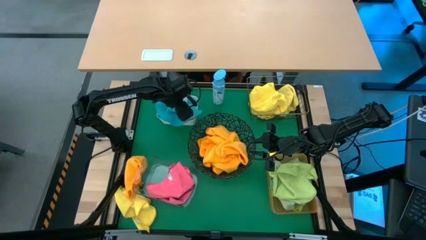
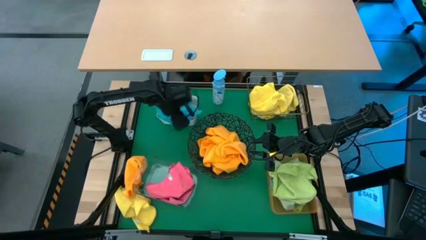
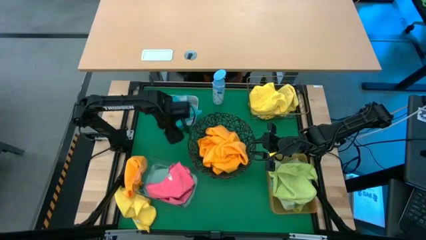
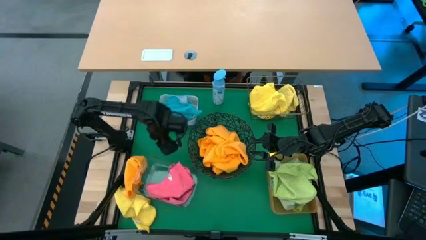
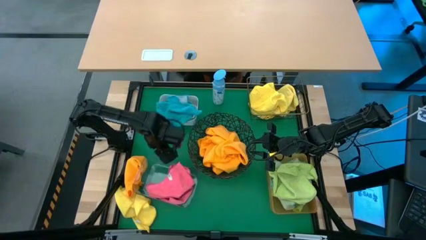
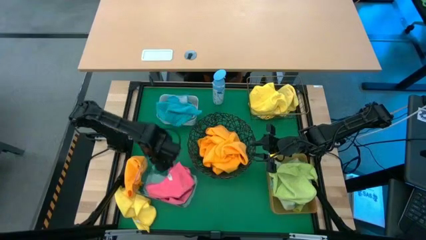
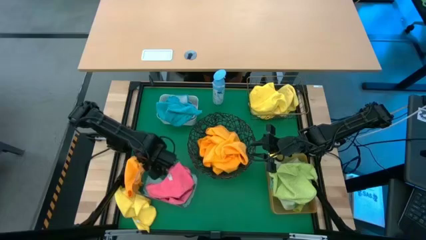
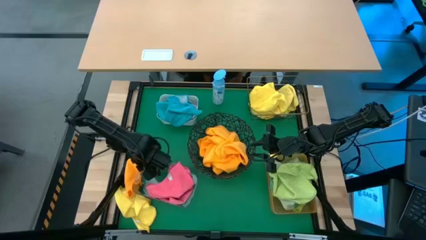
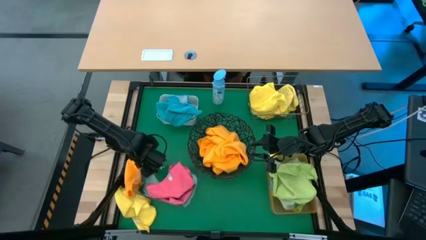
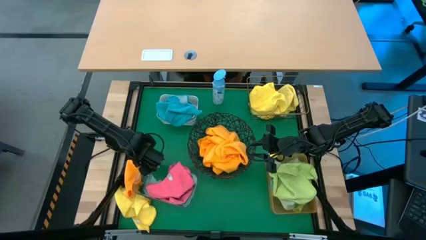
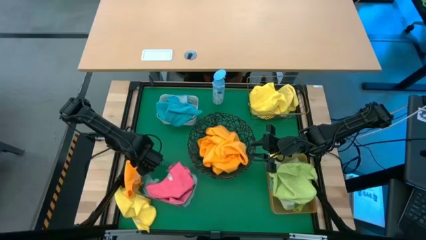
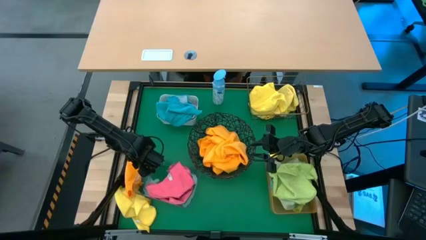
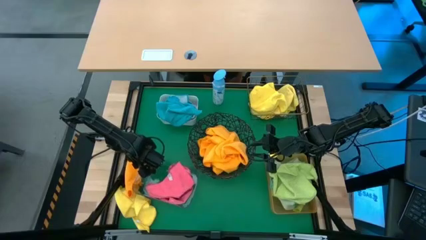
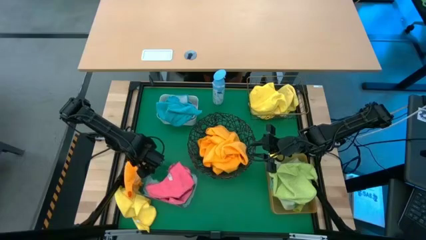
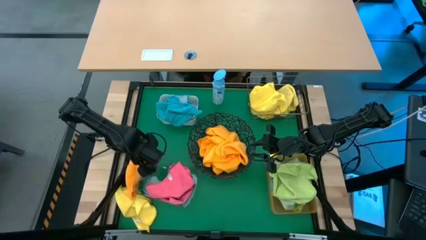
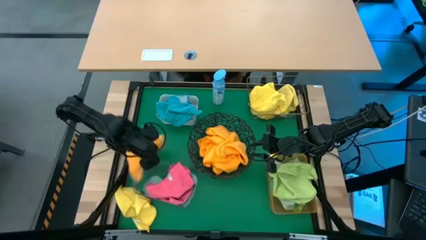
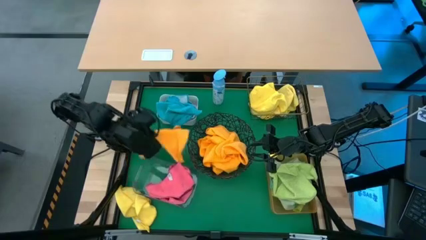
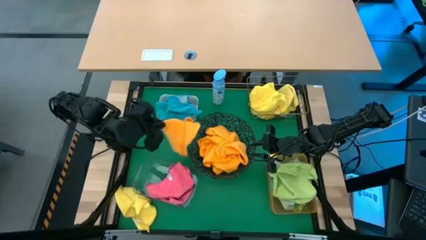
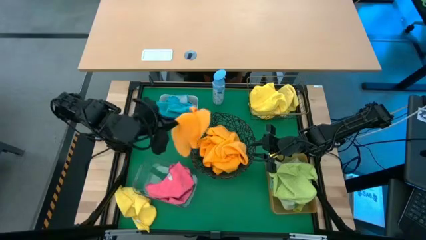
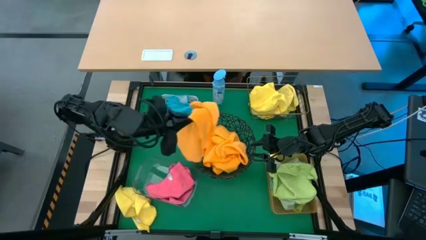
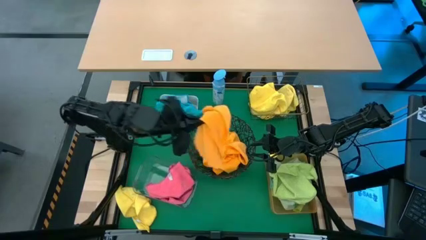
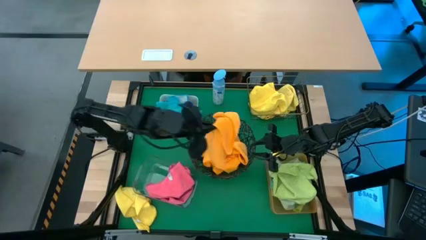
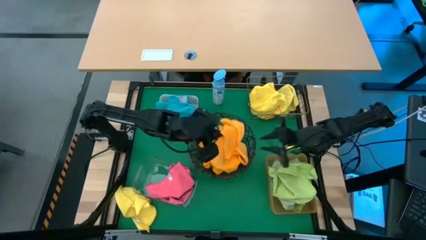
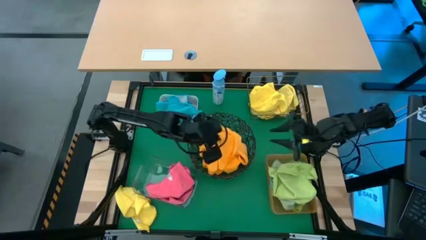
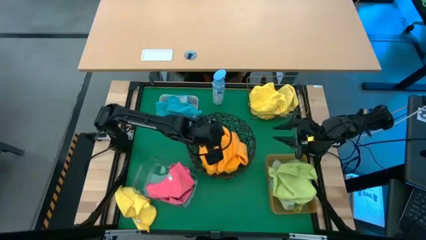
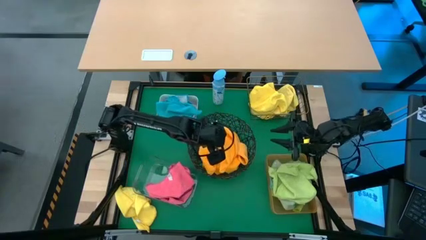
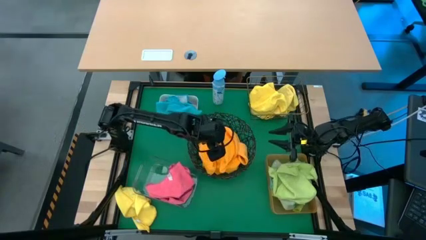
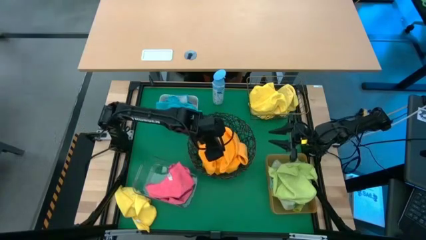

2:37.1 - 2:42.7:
Task: Sort microfiber towel by color & place in baskets
Put the orange microfiber towel into the circle wire basket

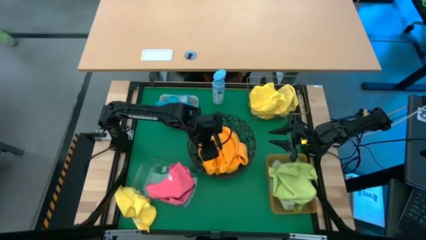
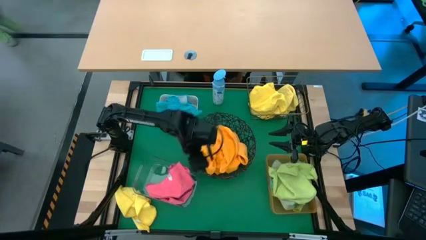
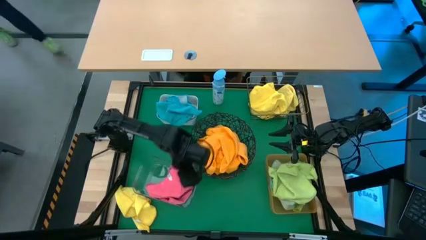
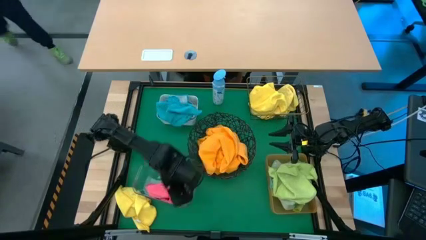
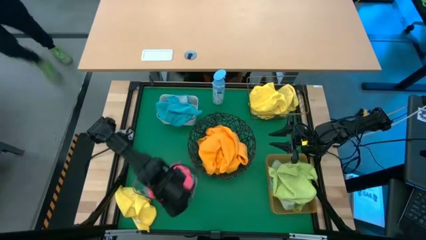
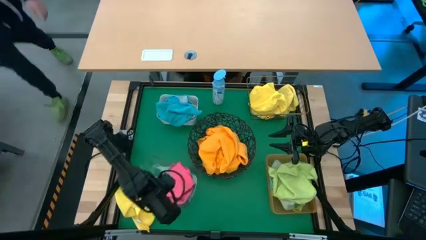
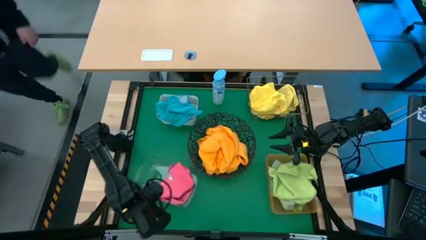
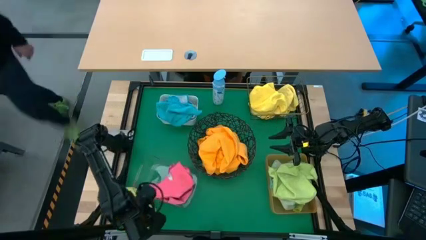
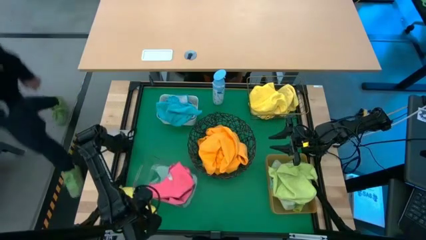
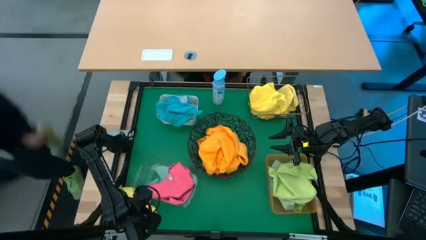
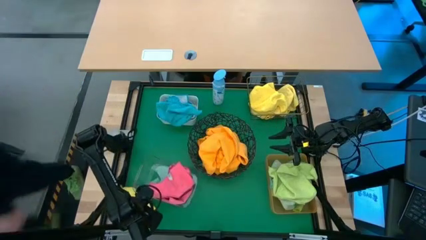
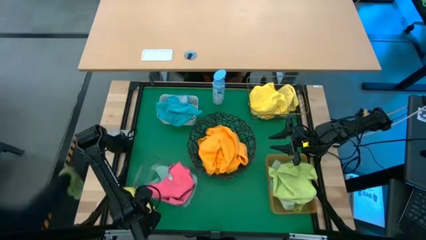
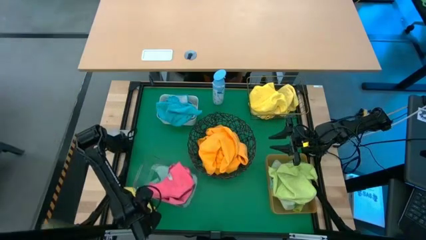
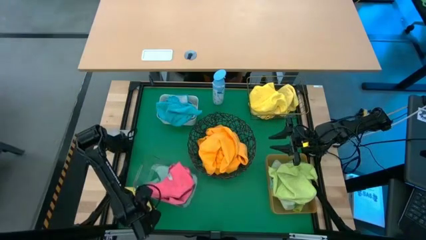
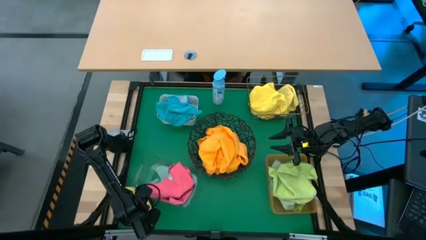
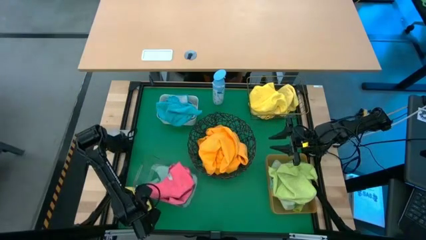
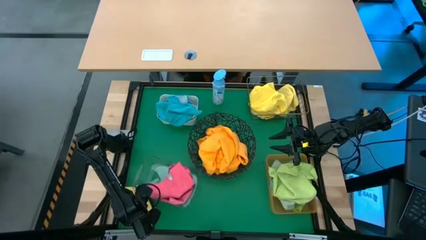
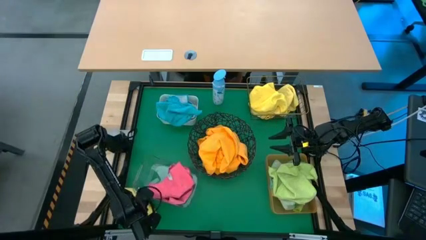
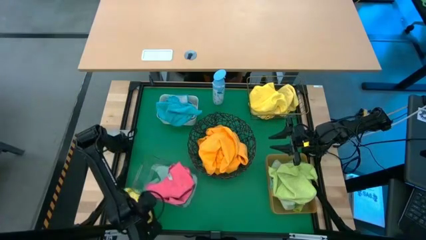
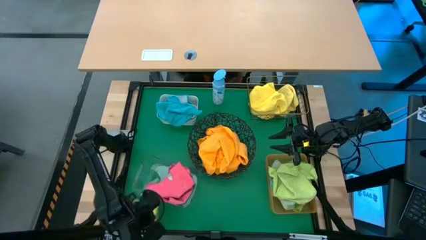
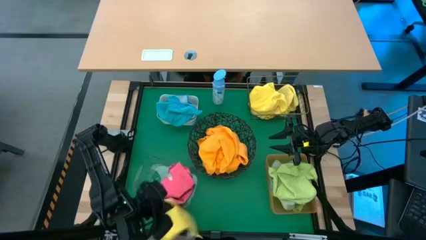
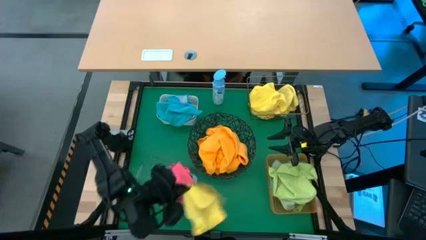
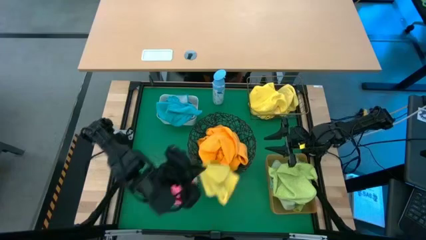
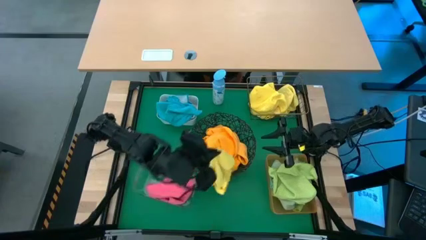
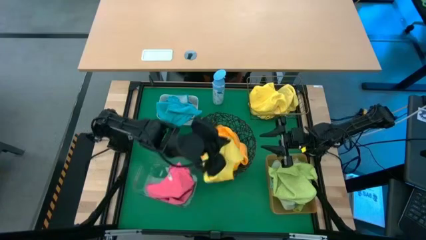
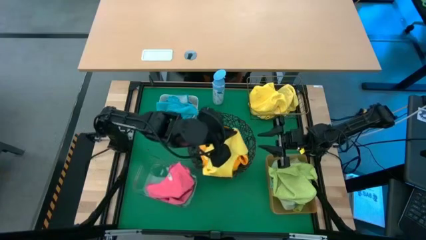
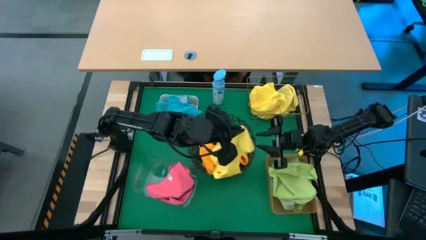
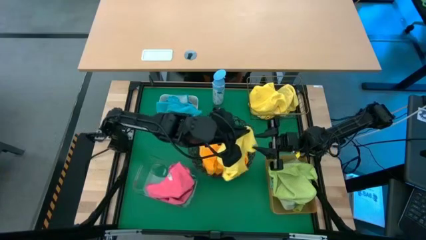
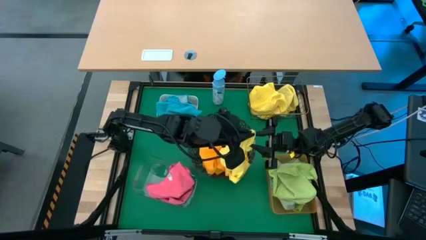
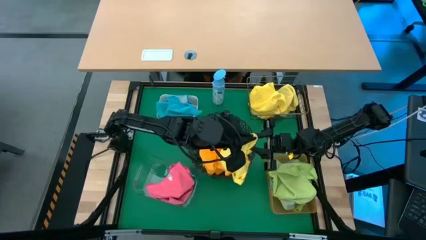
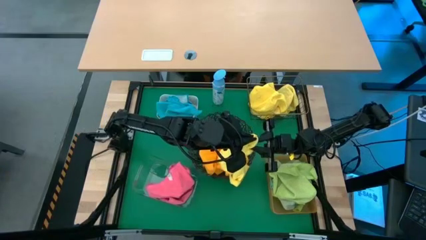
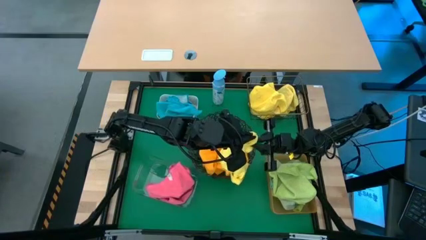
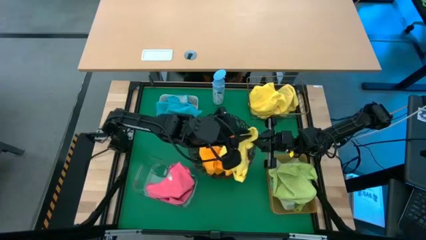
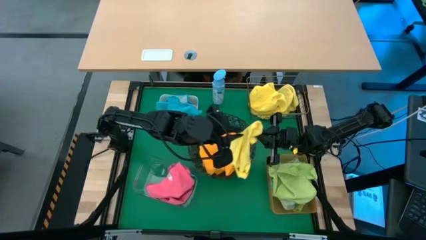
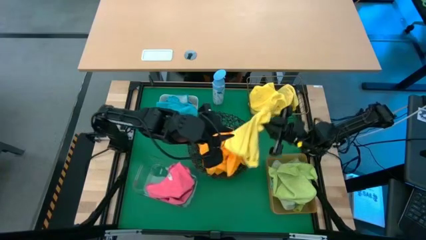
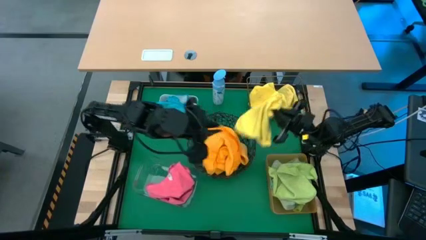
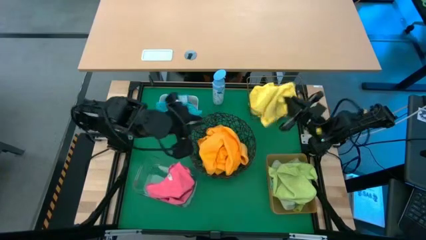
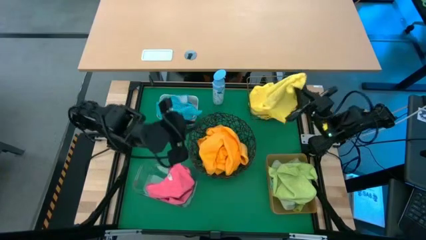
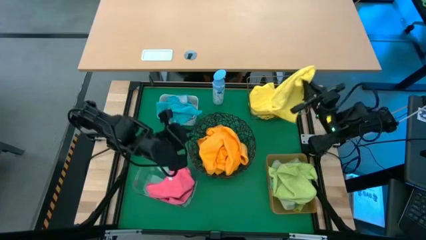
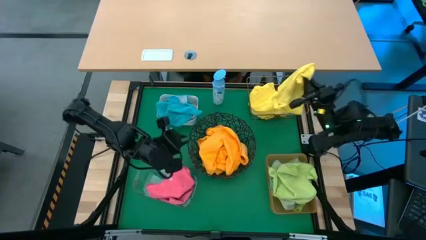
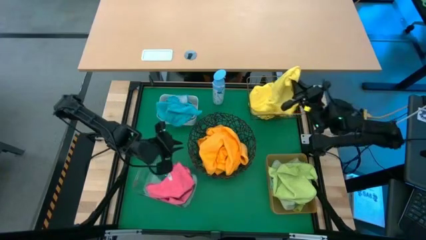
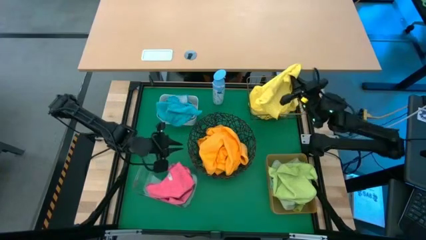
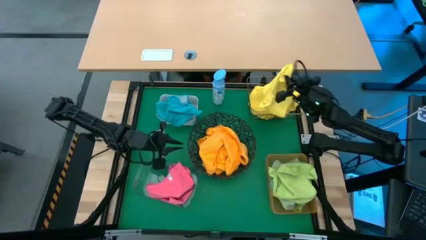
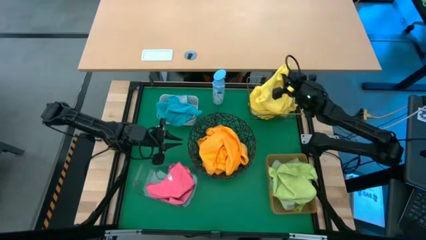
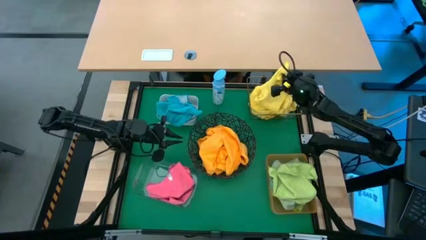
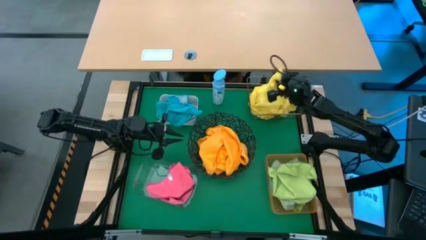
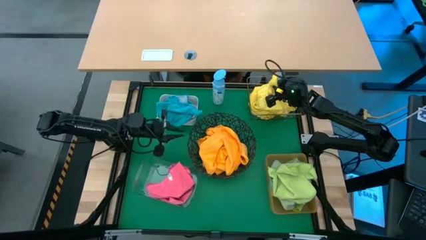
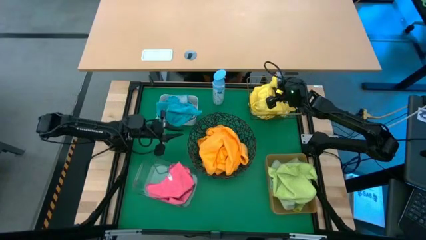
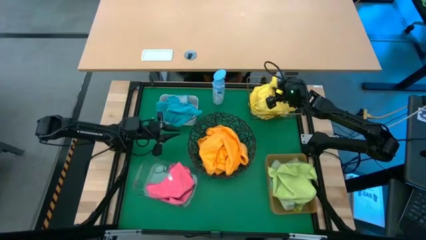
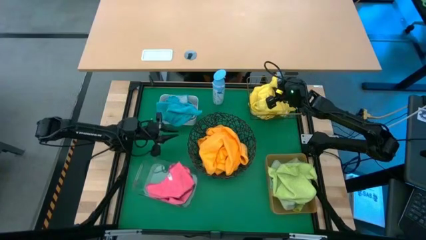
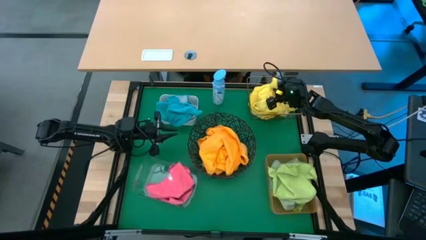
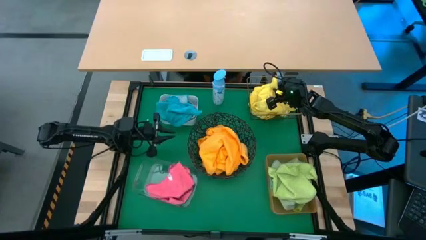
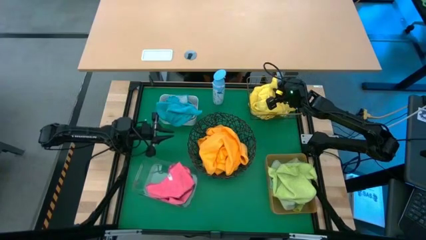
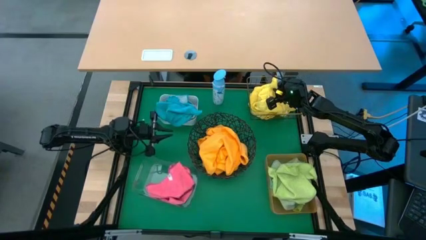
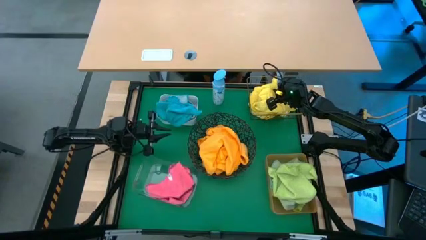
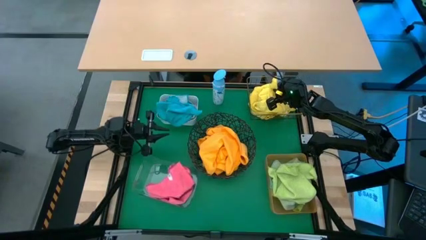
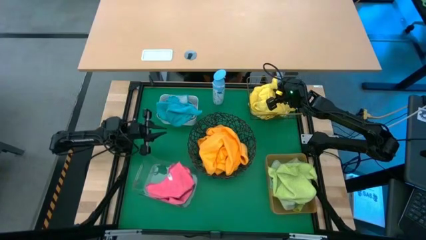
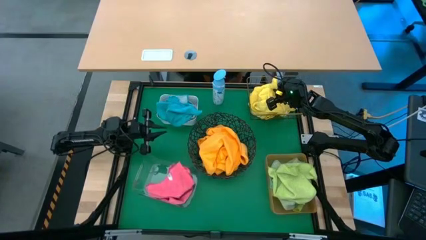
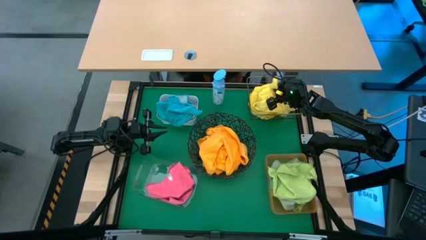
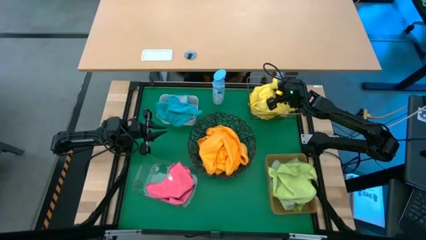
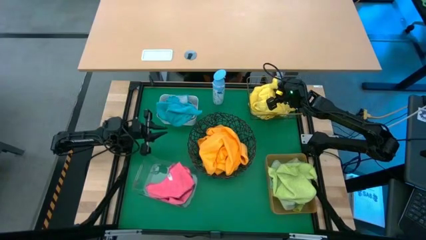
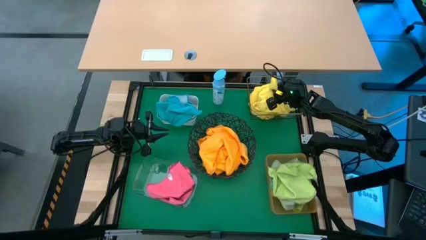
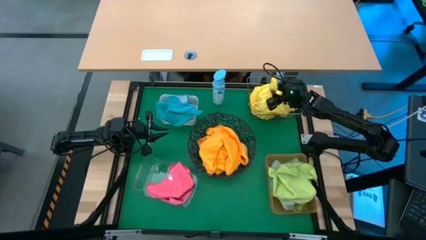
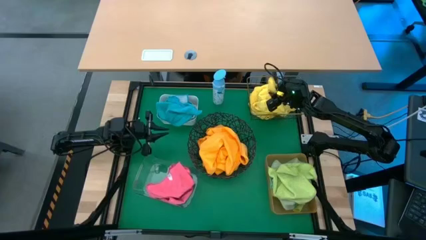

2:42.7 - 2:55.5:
Put the yellow microfiber towel into the square wire basket
